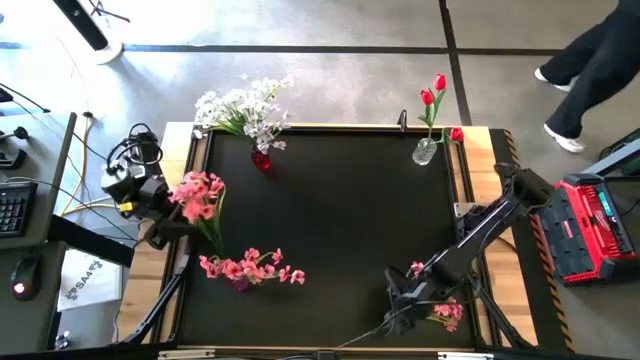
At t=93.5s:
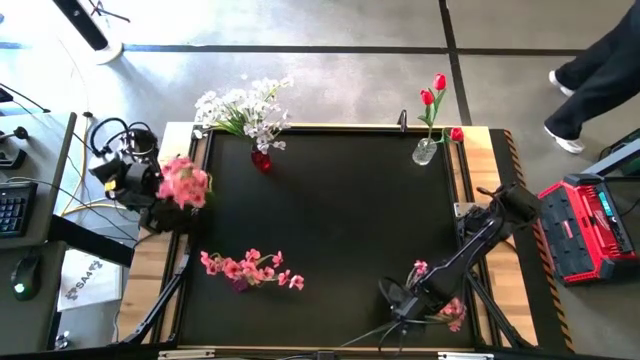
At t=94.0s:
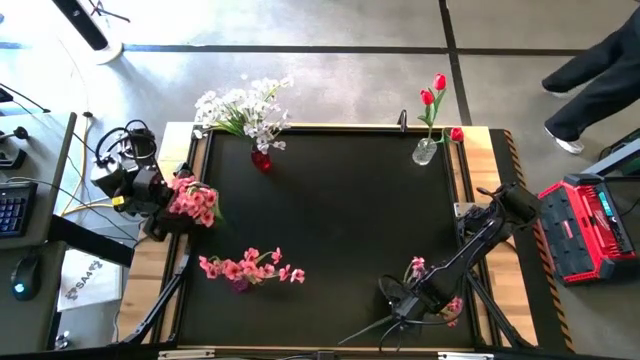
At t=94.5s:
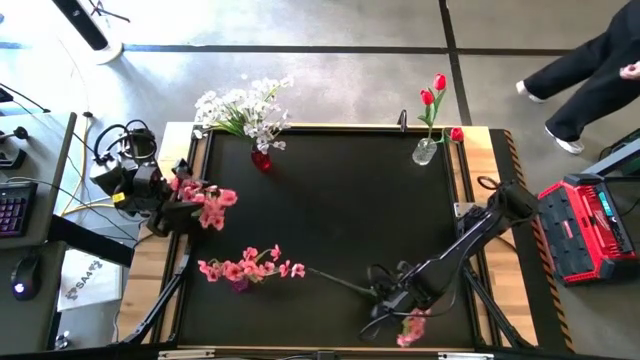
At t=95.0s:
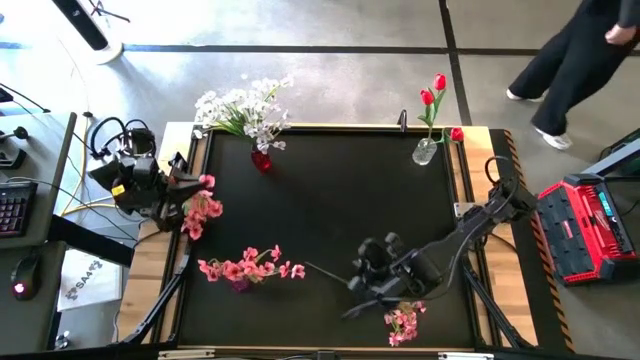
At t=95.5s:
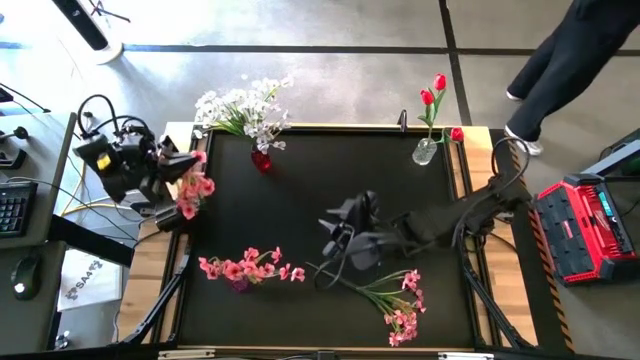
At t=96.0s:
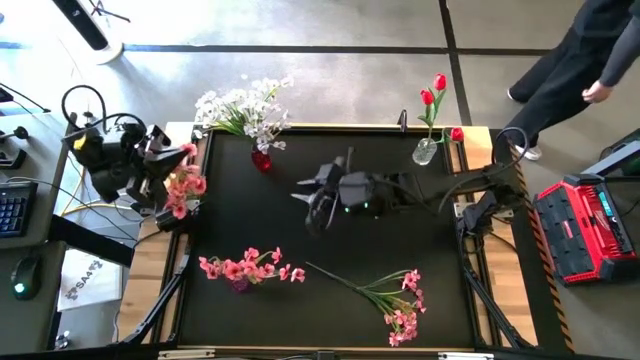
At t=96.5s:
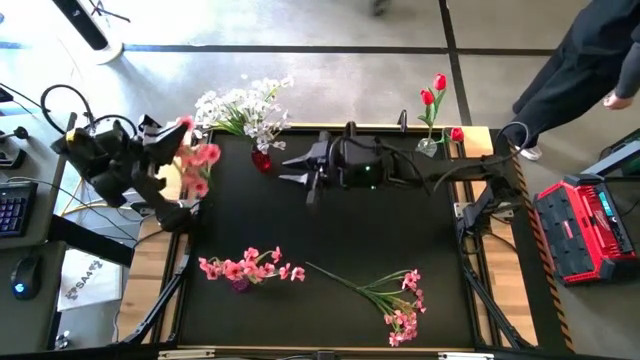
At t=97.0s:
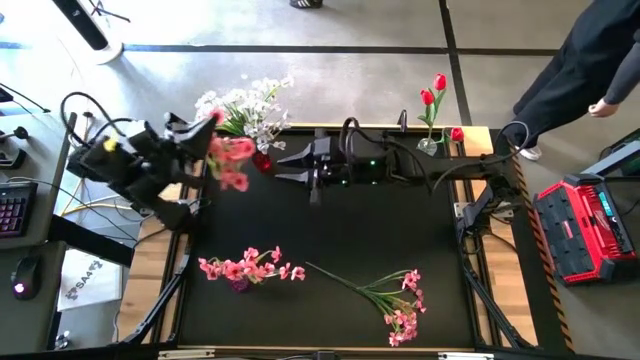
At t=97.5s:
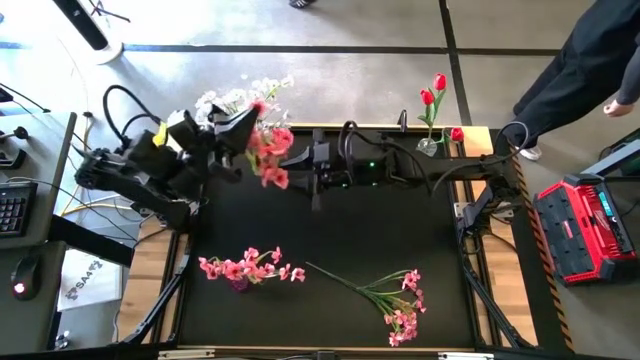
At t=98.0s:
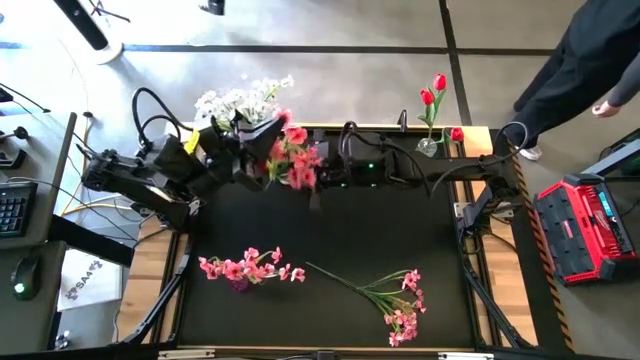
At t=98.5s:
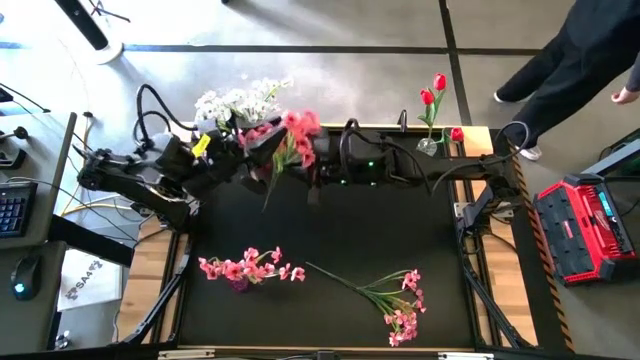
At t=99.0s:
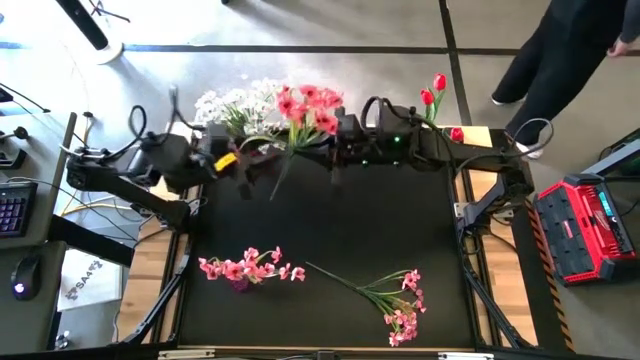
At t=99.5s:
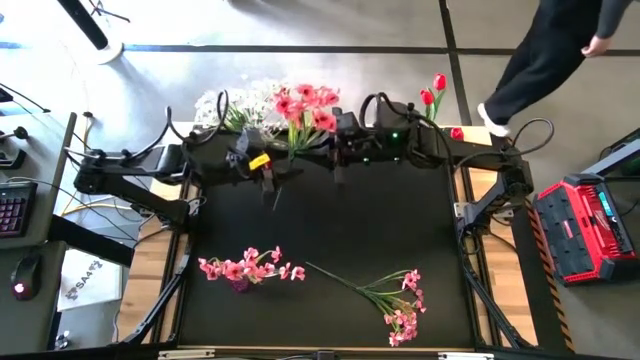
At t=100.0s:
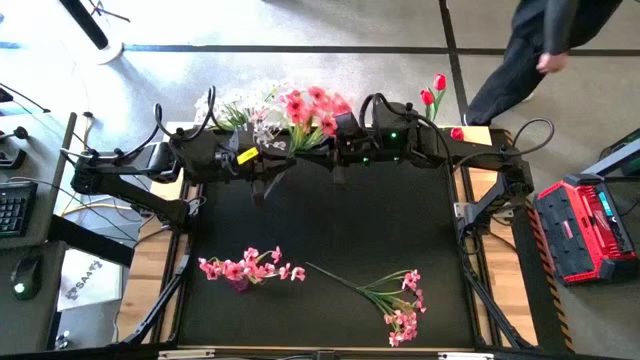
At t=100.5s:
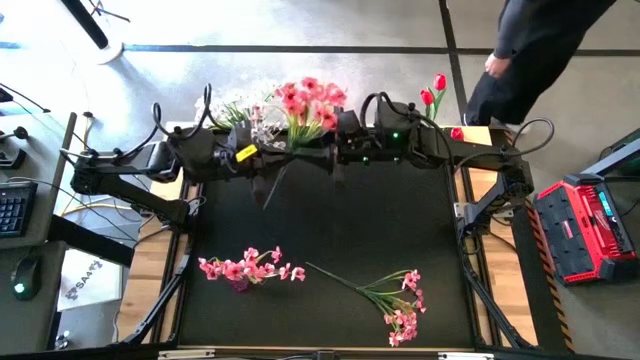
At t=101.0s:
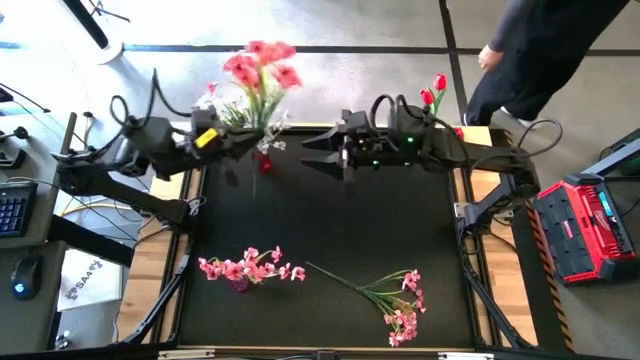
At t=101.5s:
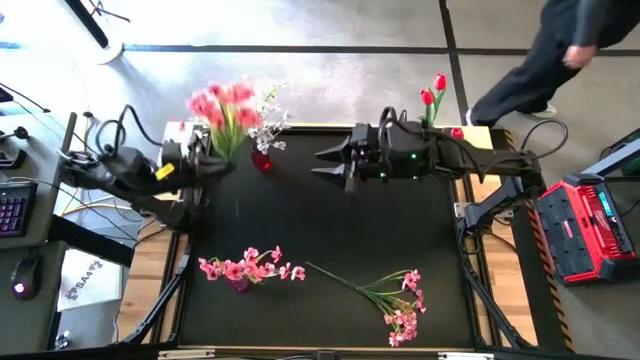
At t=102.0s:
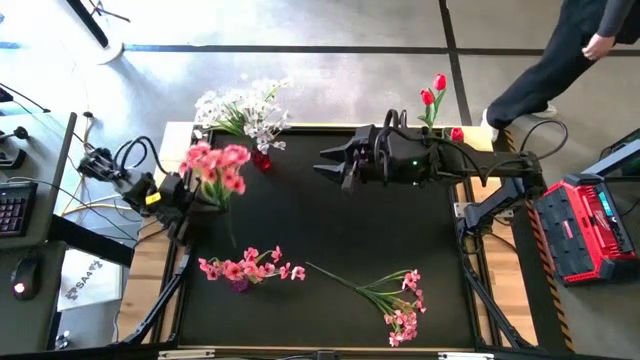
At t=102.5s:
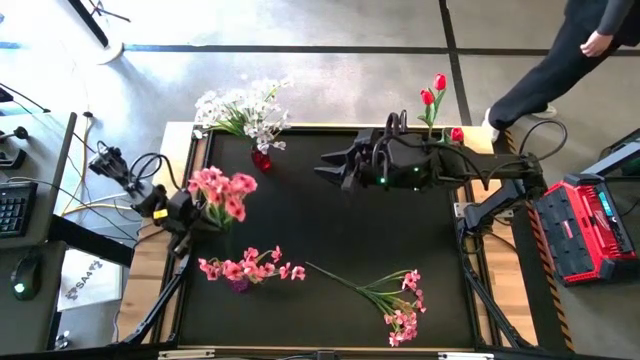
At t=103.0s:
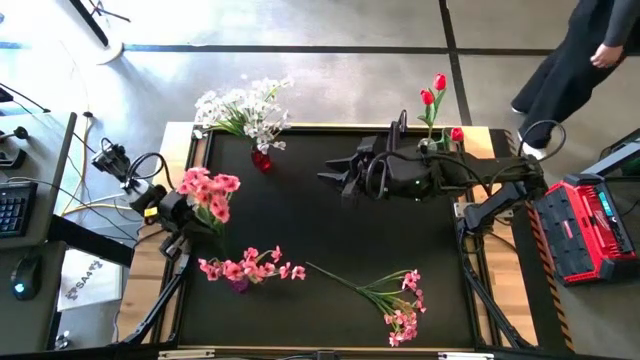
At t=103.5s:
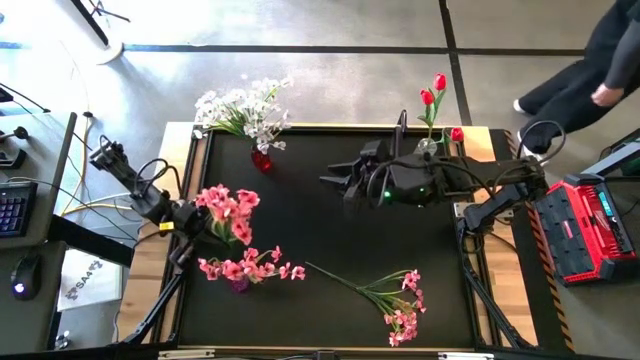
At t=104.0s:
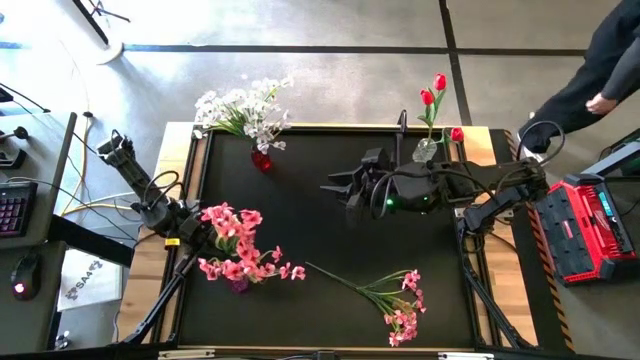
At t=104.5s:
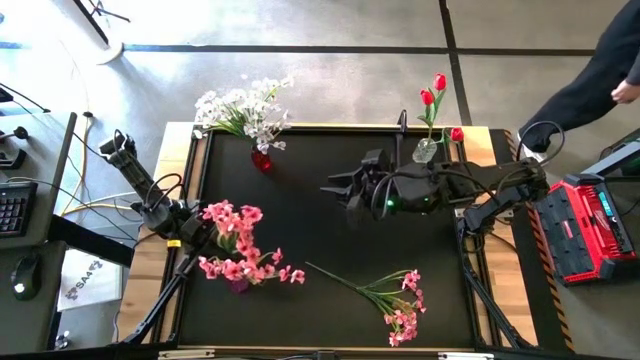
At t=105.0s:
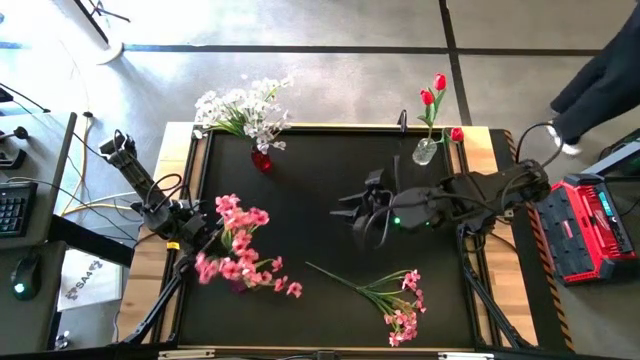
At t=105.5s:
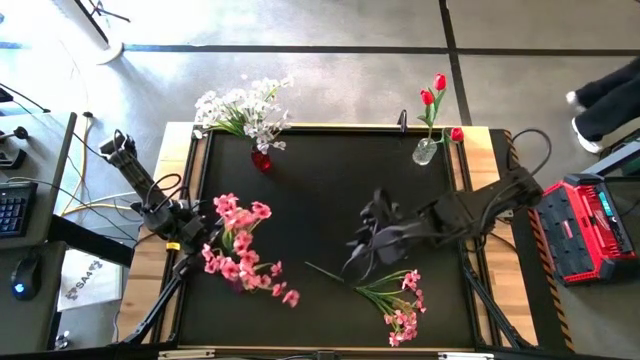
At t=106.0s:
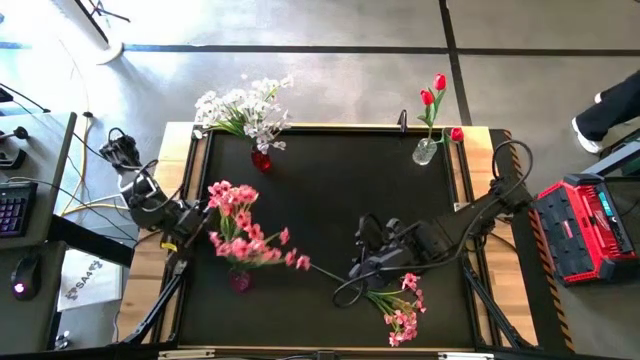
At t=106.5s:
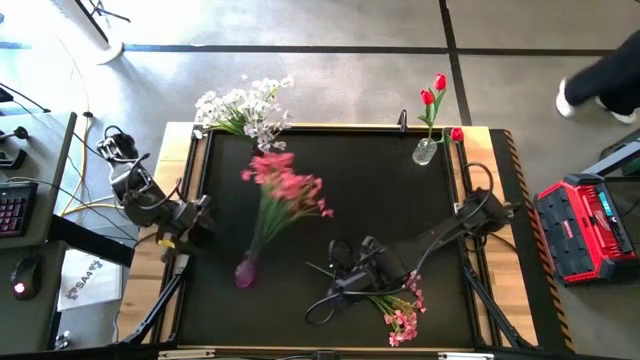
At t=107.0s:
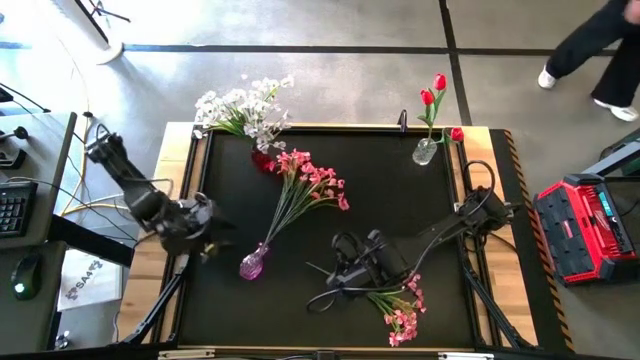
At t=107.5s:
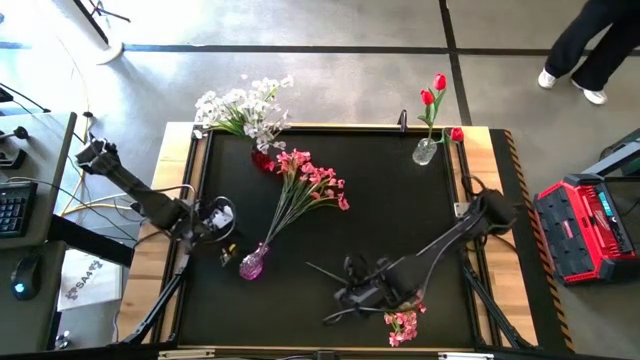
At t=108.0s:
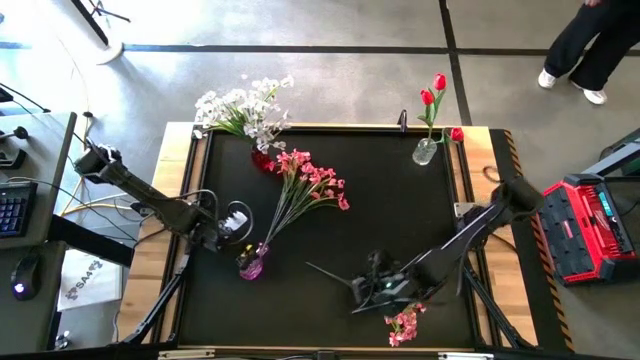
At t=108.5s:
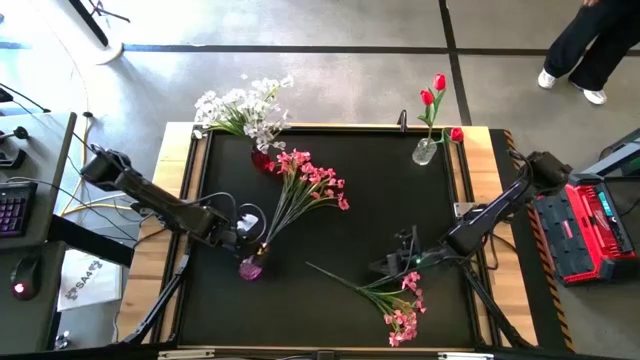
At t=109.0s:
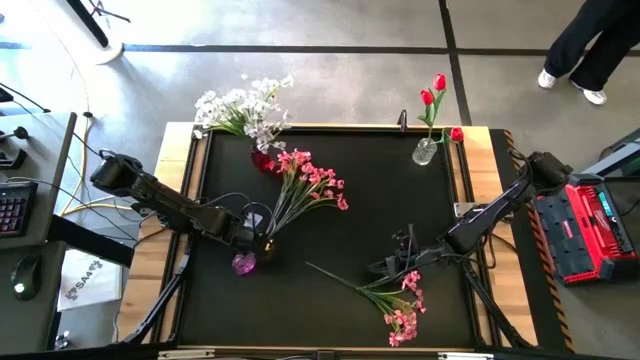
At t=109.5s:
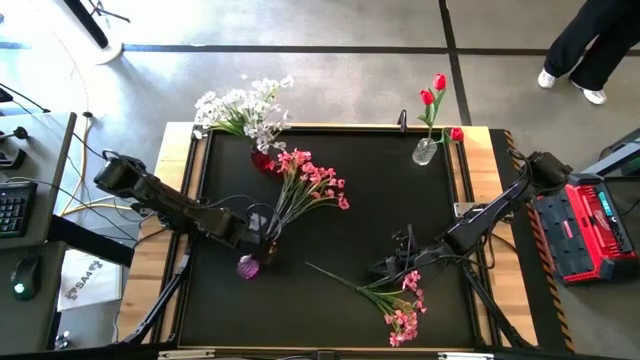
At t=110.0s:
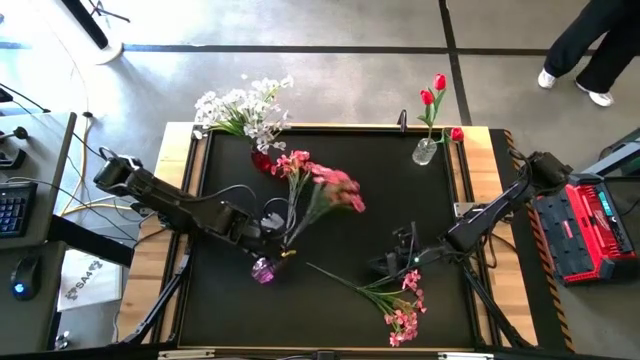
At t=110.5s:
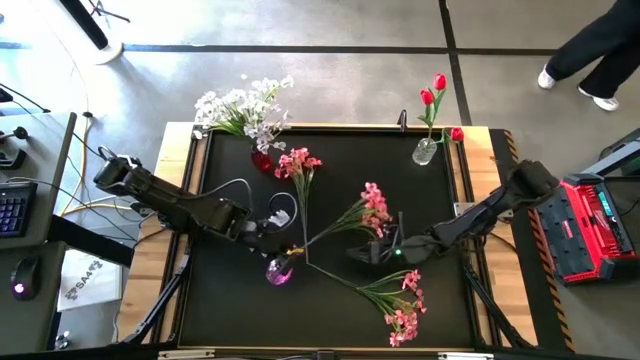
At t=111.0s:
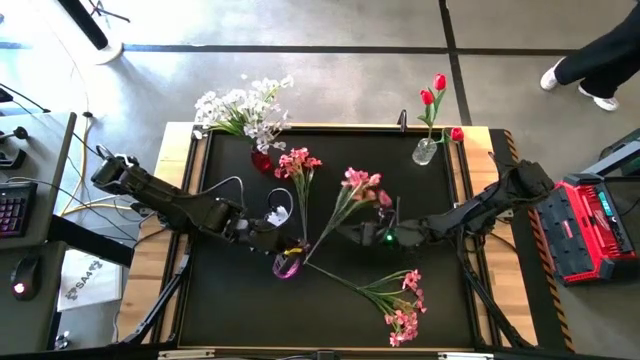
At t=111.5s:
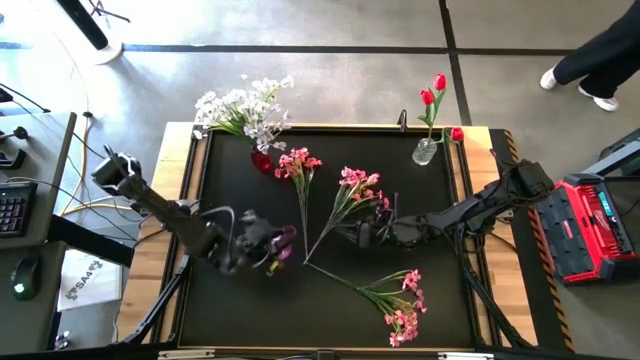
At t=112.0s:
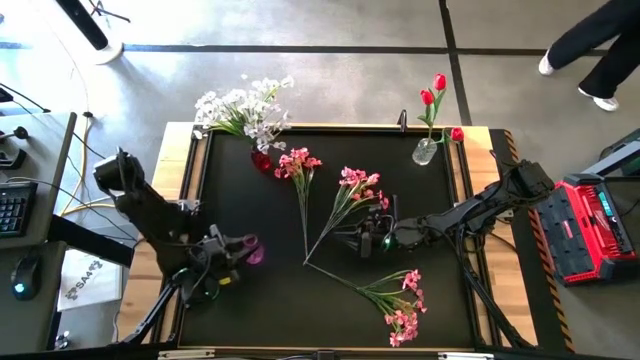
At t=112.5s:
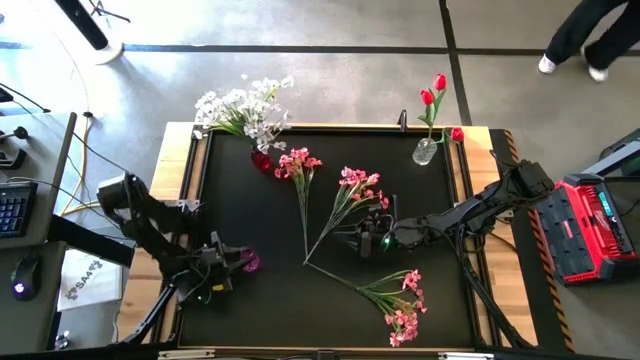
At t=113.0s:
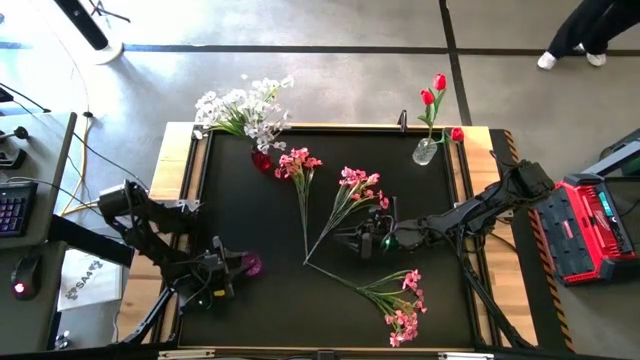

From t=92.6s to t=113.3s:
Task: Sort flowers into vase by color
Put the top pink flowers into the violet vase
